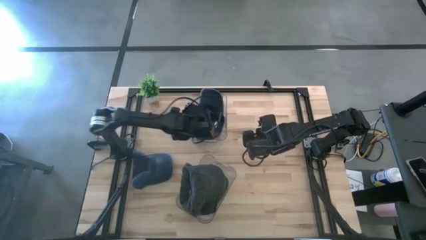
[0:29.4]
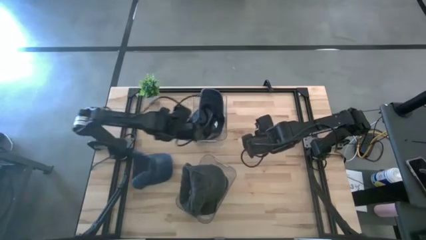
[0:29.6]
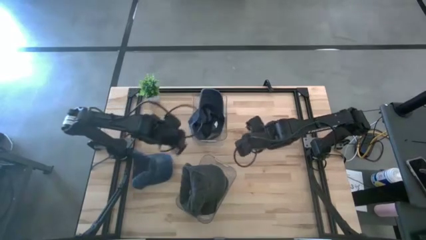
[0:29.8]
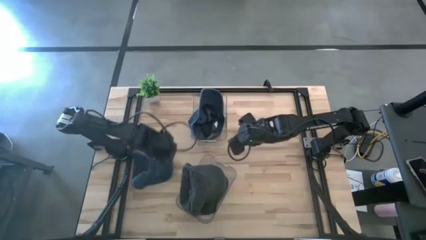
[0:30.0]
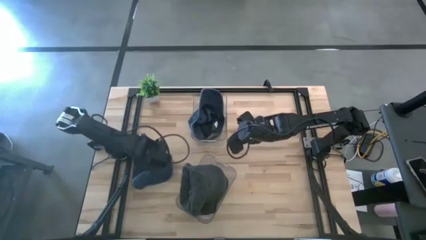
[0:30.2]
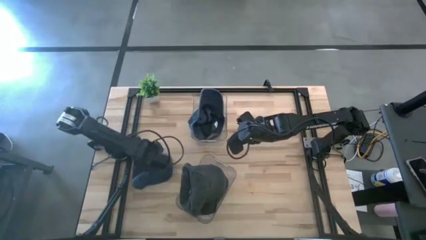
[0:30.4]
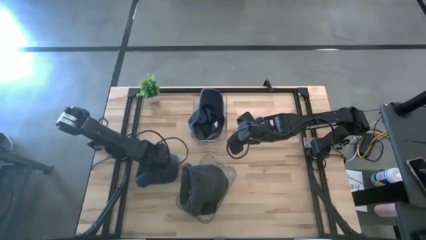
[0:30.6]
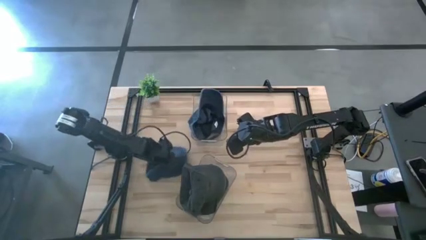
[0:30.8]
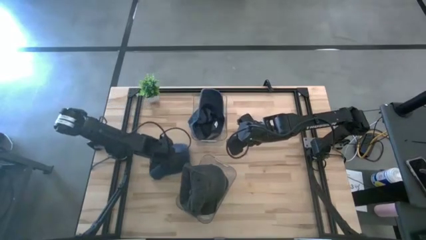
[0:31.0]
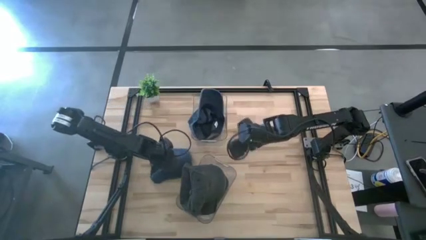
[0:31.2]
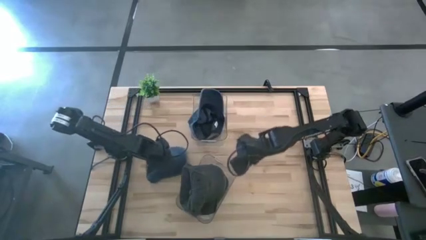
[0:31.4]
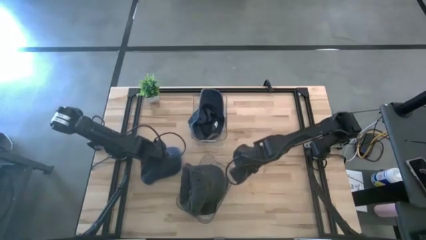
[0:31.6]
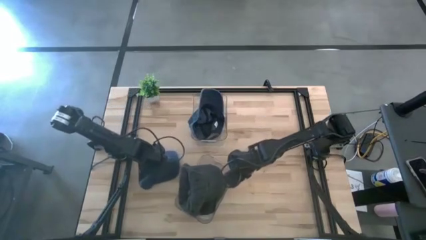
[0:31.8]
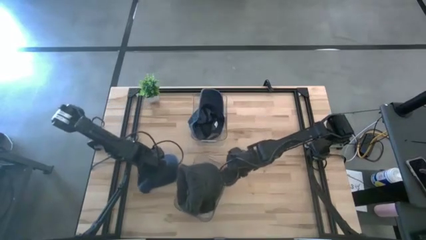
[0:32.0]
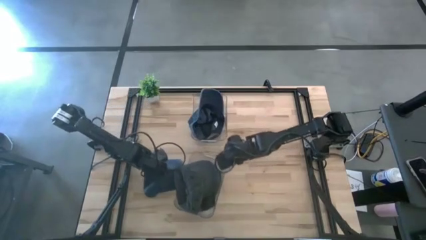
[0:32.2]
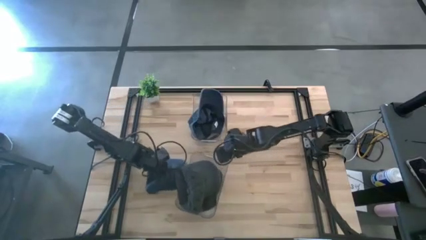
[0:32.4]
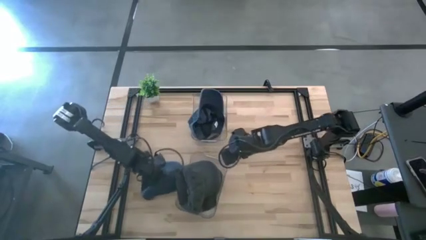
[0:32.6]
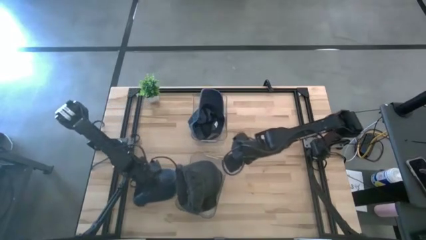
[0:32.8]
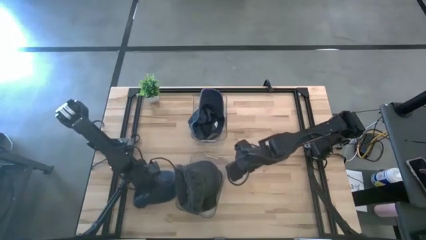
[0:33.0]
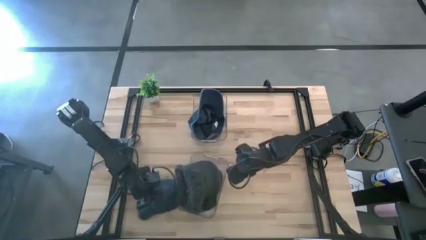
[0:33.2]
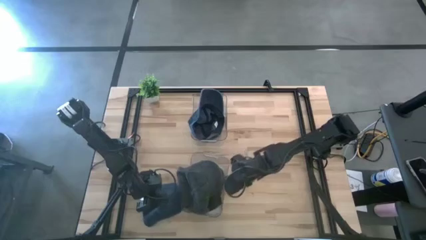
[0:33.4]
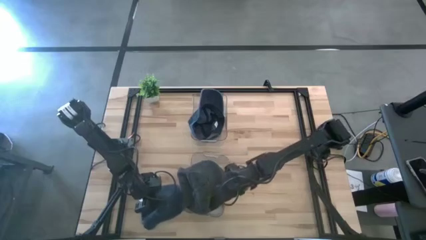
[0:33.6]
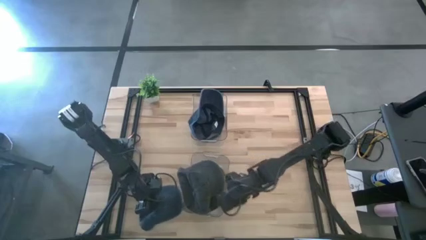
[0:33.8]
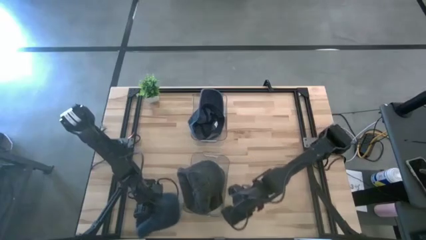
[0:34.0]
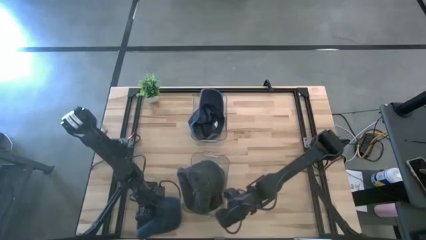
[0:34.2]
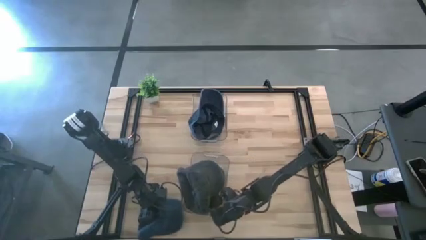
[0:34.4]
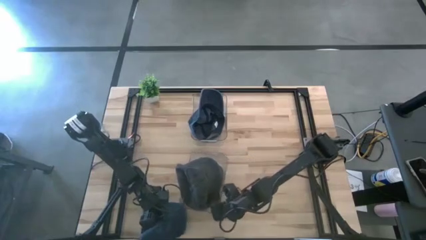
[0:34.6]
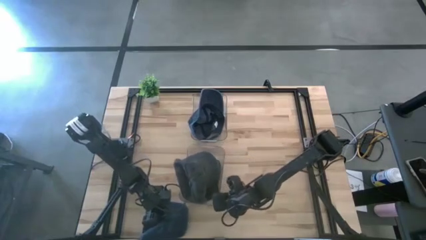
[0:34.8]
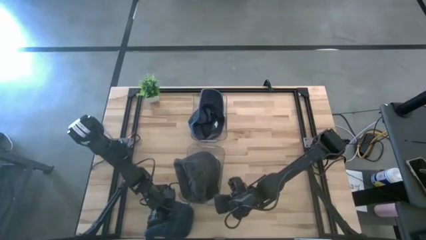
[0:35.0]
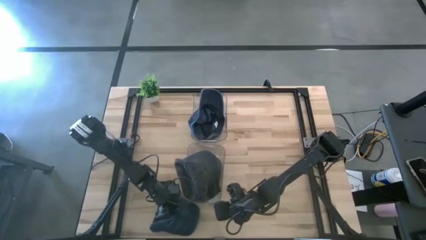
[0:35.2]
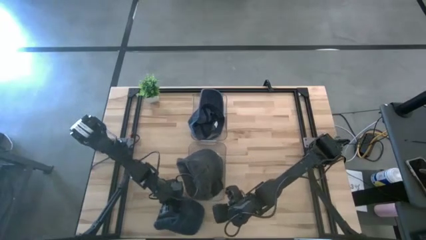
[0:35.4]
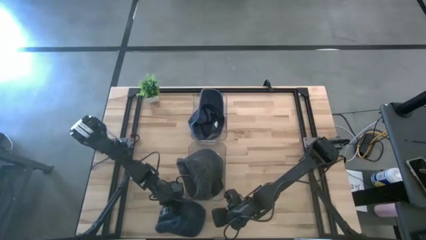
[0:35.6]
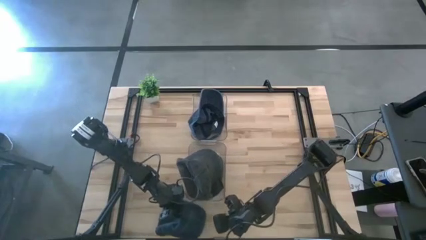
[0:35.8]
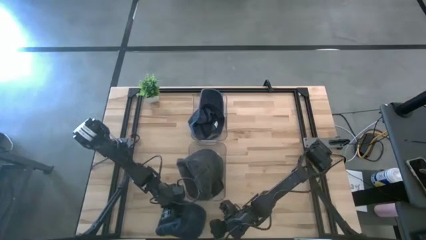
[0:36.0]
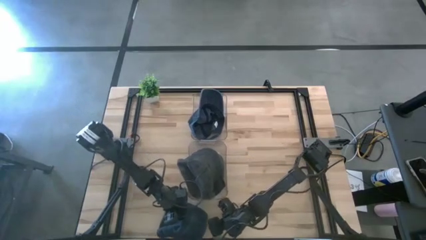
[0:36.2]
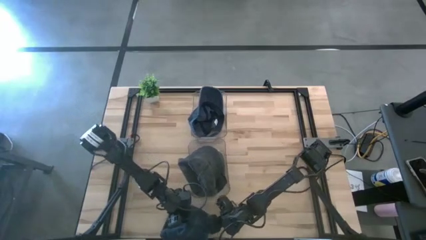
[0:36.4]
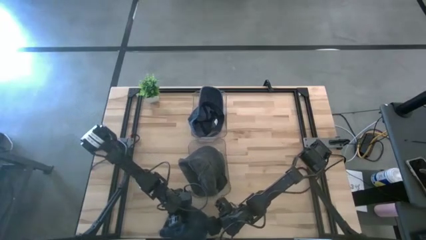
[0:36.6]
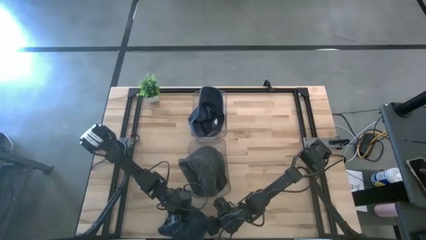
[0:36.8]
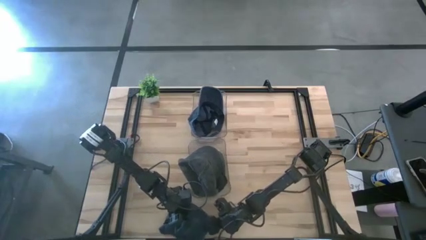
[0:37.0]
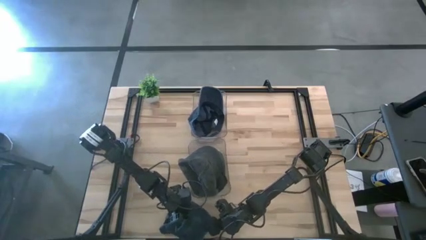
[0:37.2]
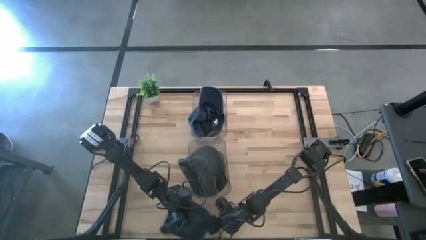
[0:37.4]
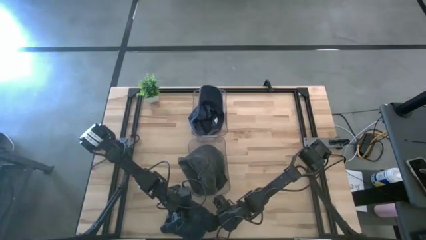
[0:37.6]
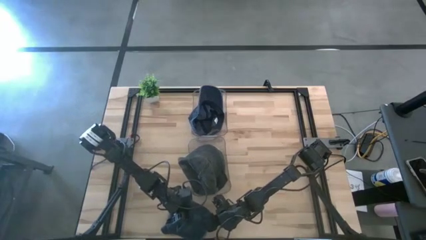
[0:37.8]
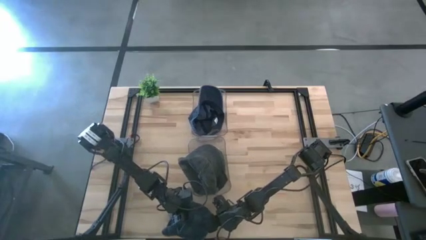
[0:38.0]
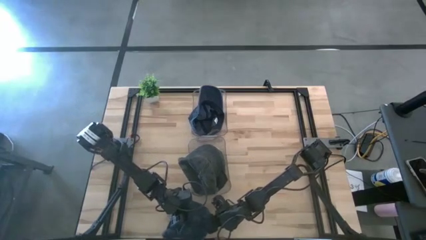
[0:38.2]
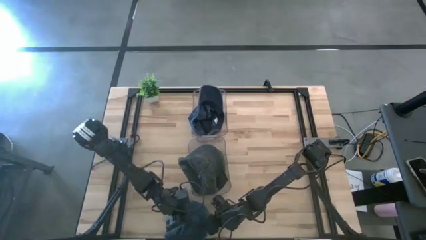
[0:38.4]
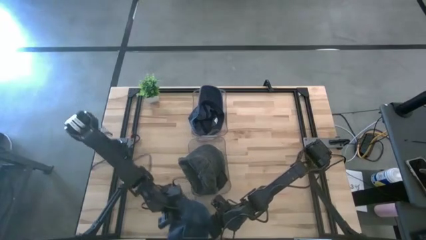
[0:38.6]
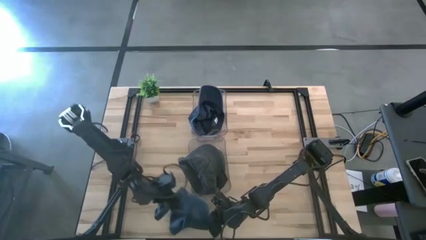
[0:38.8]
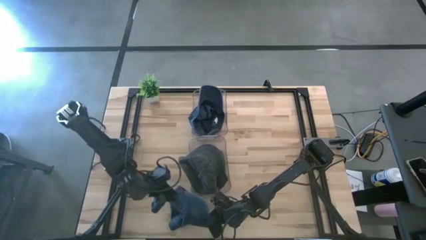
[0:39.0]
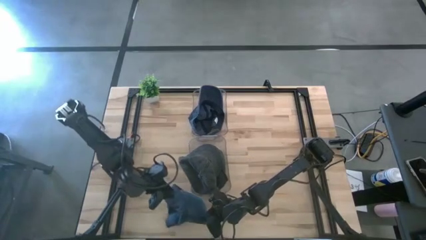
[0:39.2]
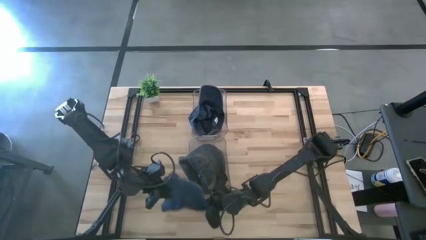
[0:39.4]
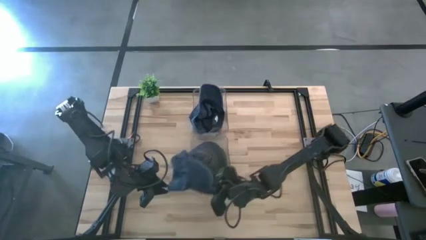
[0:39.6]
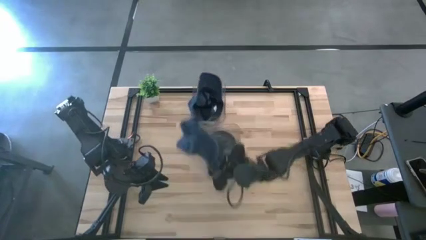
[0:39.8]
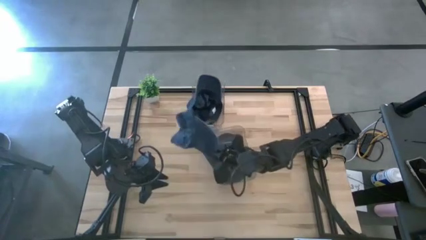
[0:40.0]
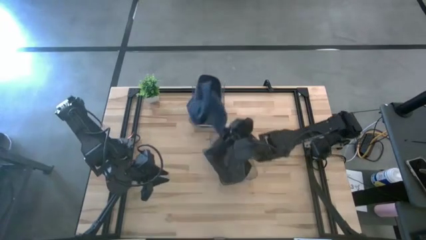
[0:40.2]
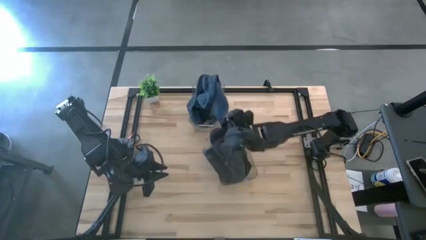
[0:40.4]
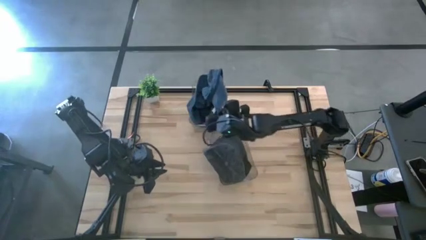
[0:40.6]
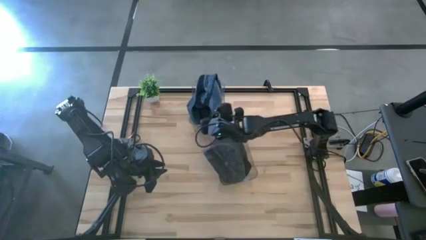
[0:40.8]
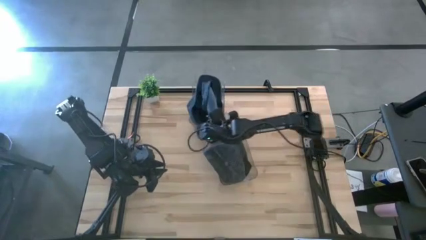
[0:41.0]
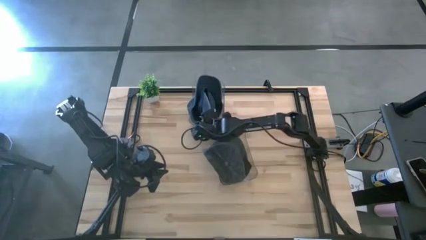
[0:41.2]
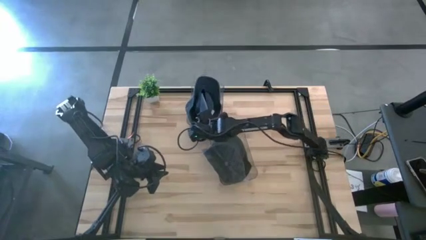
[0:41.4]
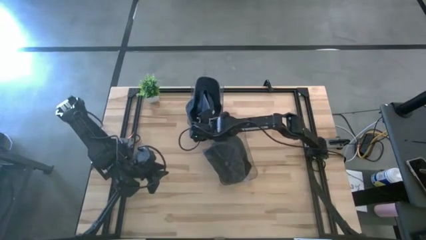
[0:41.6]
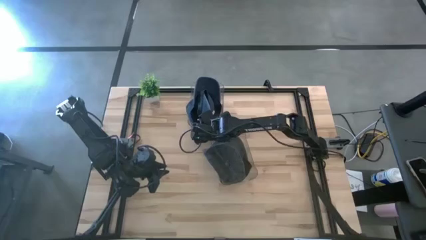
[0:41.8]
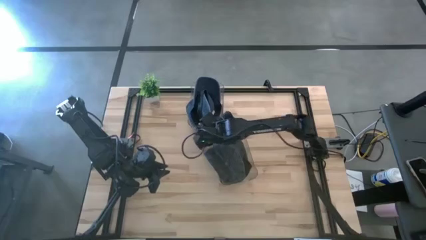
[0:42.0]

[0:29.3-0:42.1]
Task: Pick & Place hat
Put the blue cap into the top transparent bin

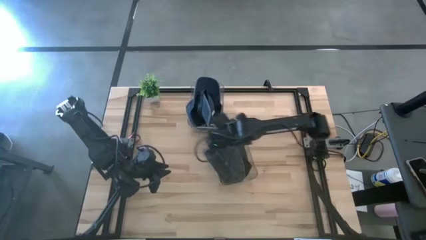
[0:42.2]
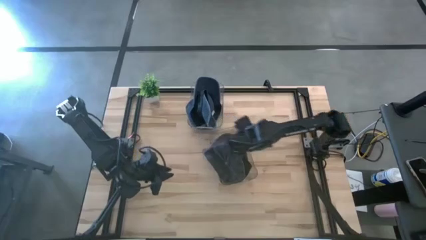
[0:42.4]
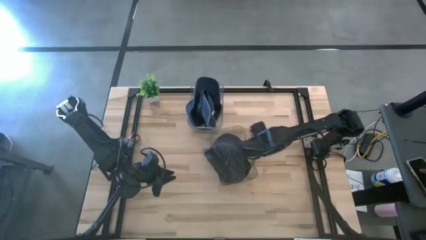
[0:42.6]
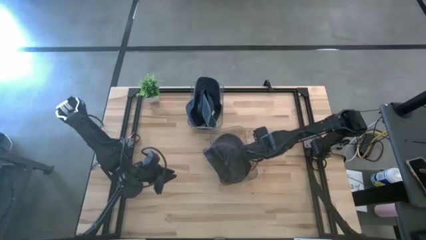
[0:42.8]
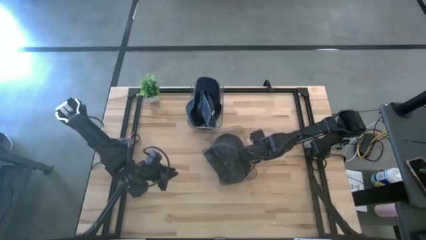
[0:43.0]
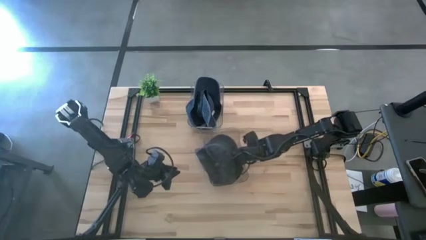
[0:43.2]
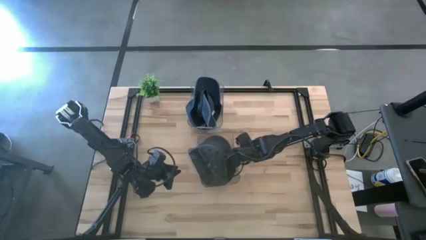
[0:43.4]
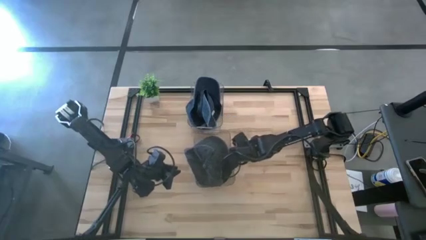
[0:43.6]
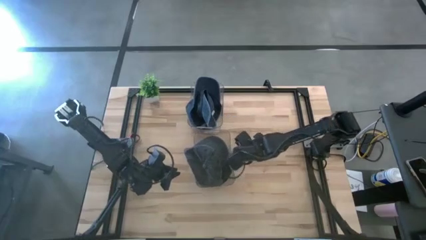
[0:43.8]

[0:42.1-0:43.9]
Adjust the bottom transparent bin
